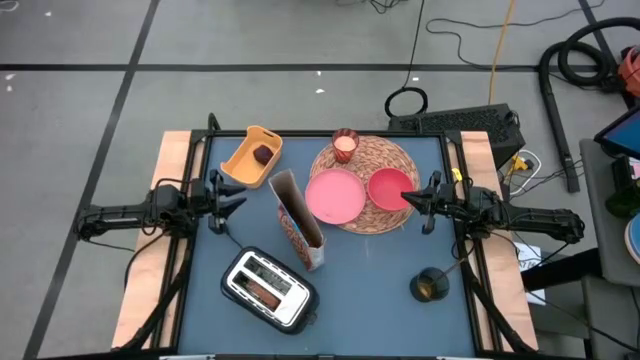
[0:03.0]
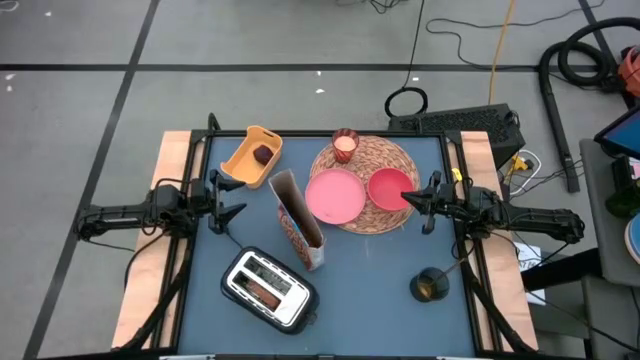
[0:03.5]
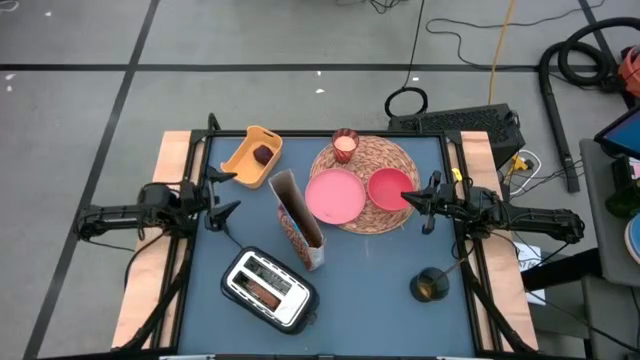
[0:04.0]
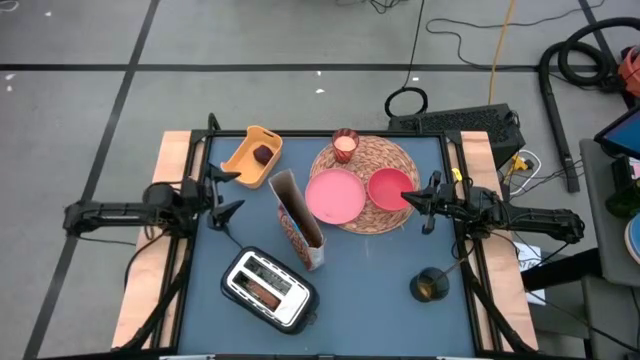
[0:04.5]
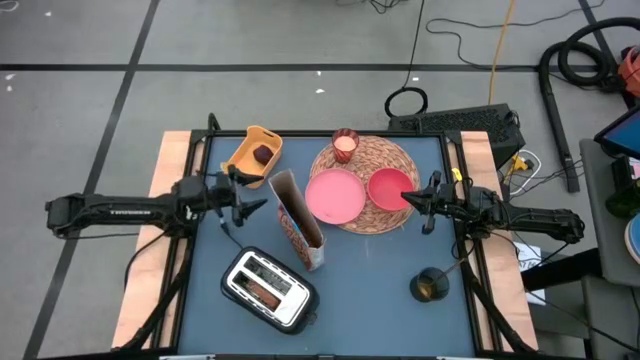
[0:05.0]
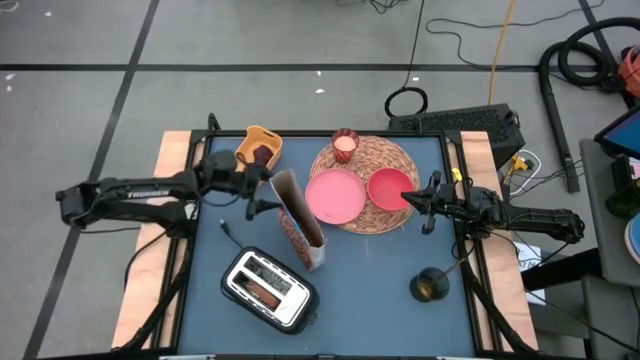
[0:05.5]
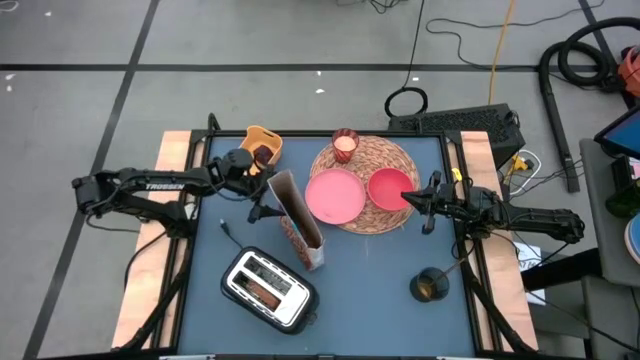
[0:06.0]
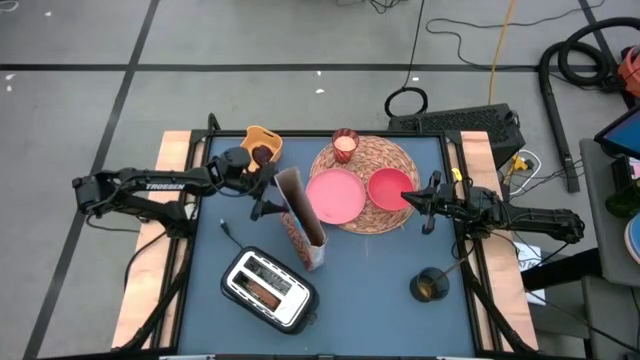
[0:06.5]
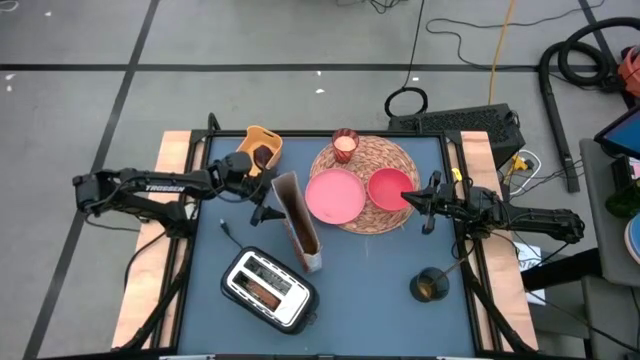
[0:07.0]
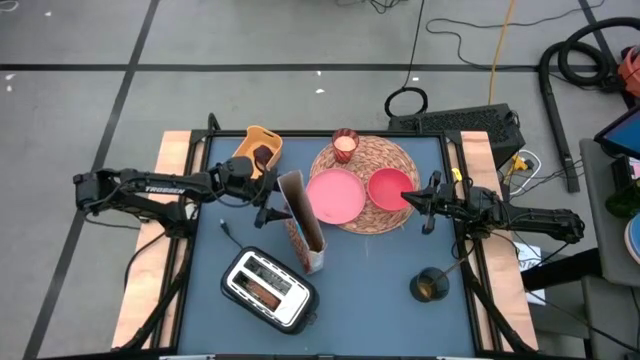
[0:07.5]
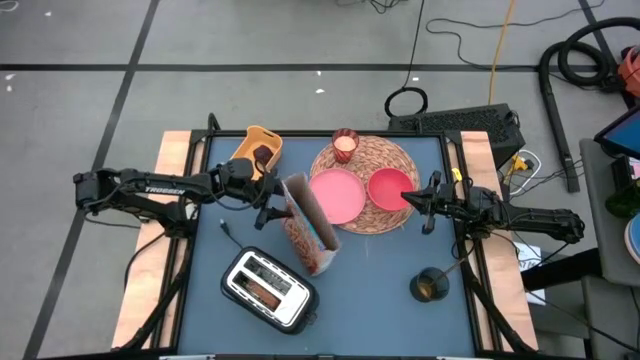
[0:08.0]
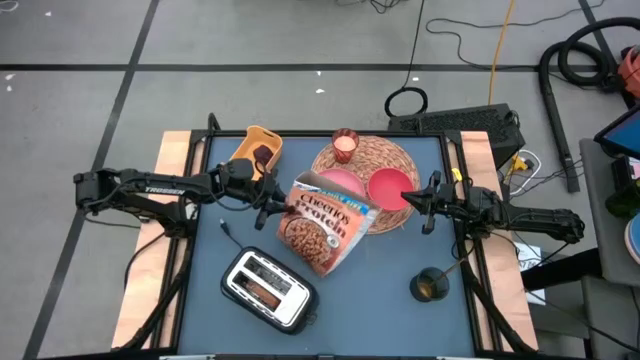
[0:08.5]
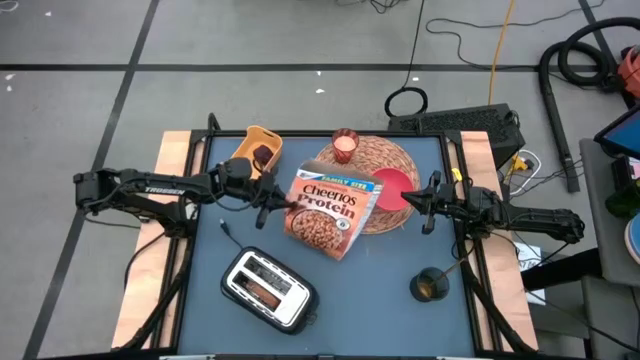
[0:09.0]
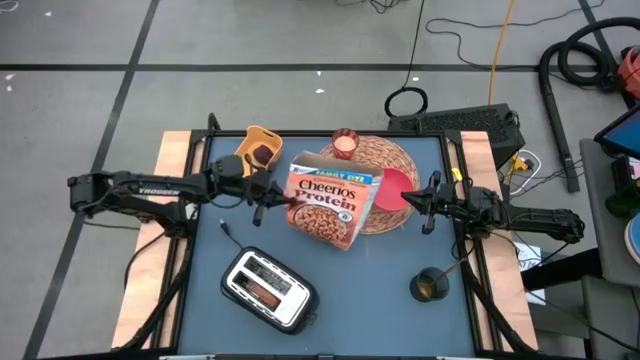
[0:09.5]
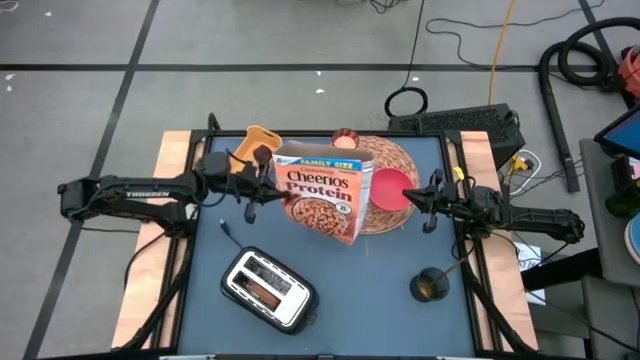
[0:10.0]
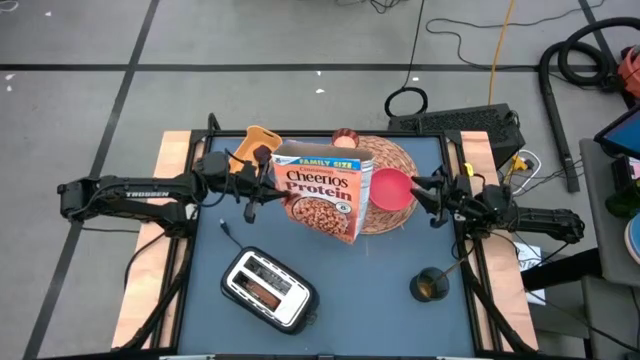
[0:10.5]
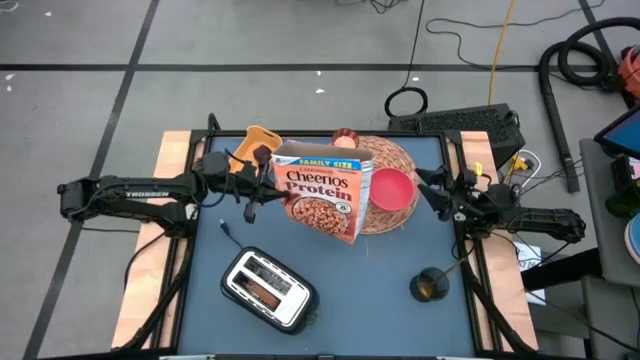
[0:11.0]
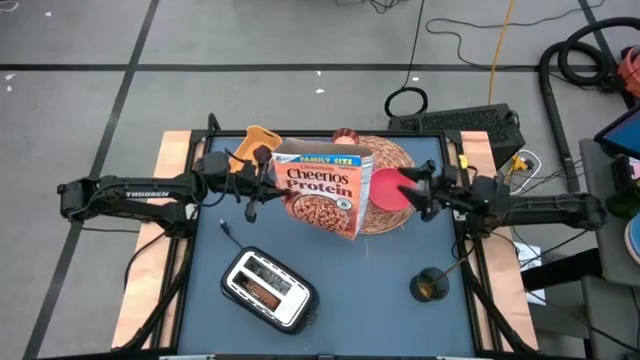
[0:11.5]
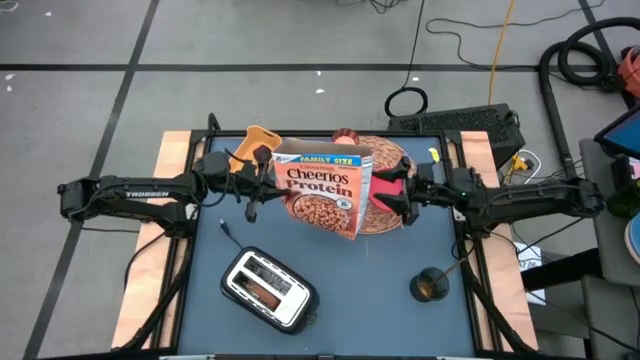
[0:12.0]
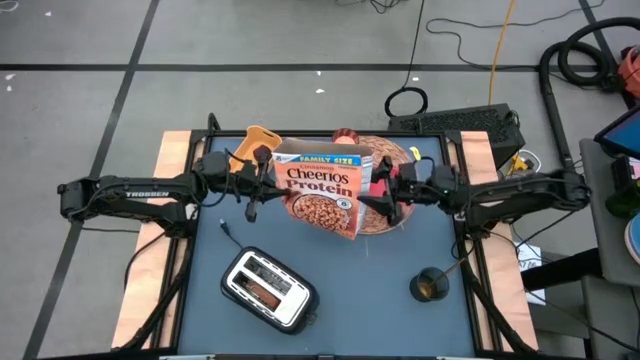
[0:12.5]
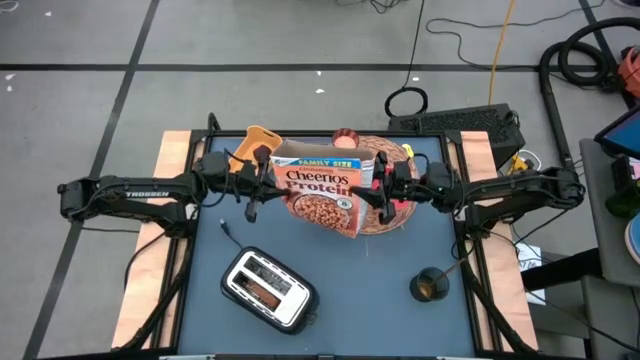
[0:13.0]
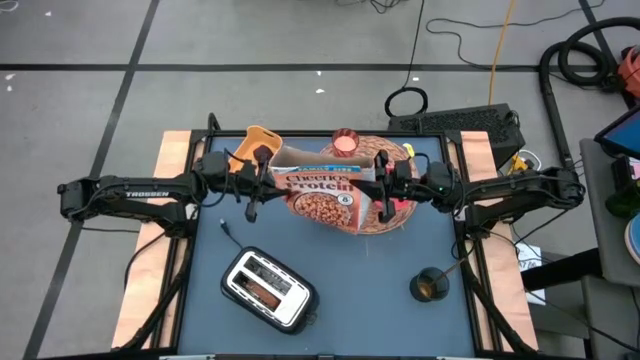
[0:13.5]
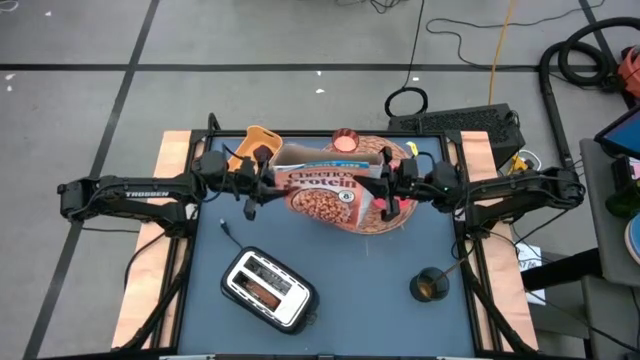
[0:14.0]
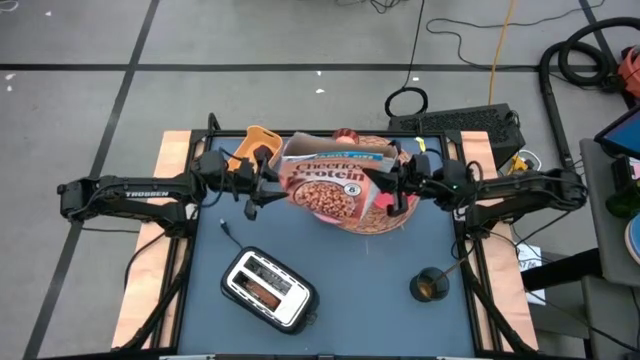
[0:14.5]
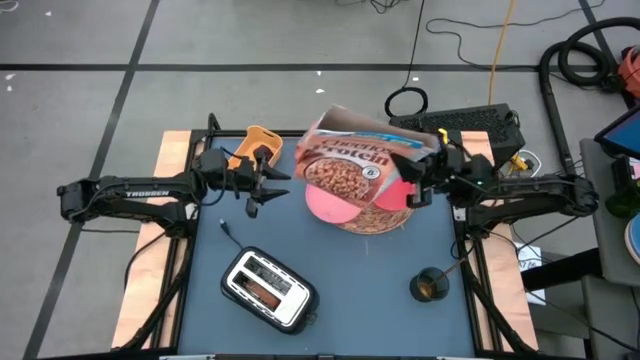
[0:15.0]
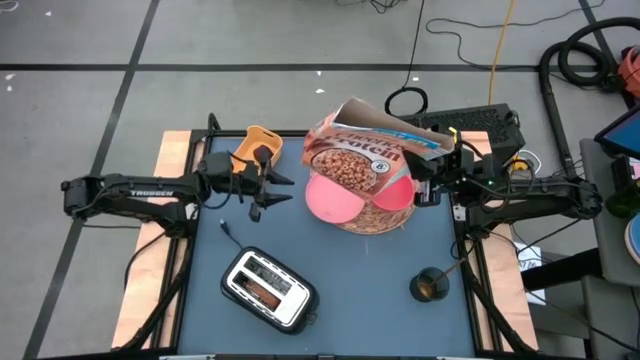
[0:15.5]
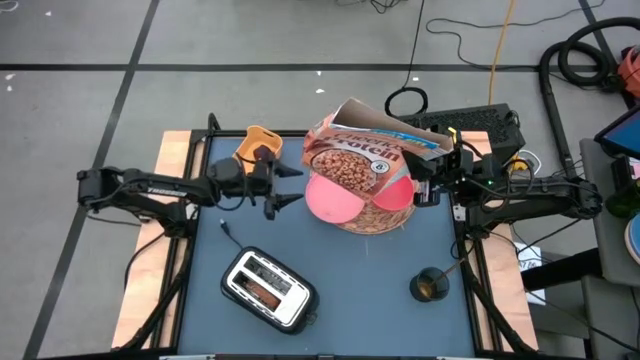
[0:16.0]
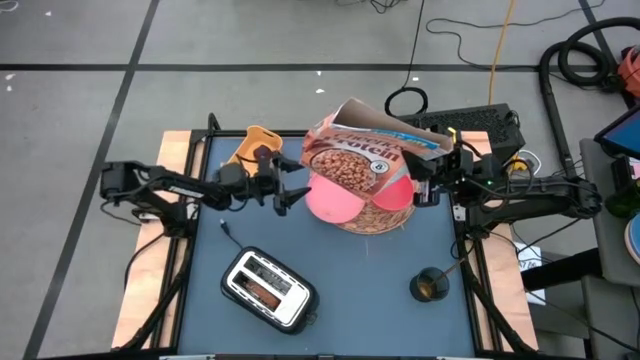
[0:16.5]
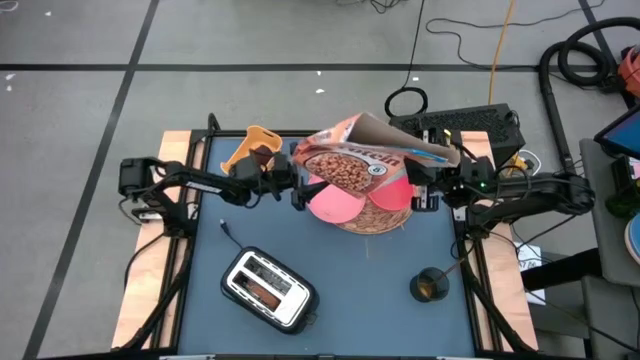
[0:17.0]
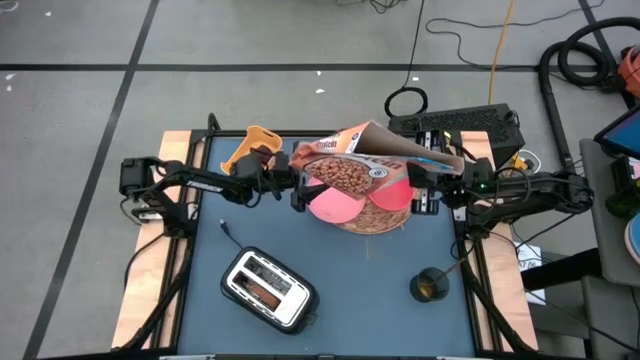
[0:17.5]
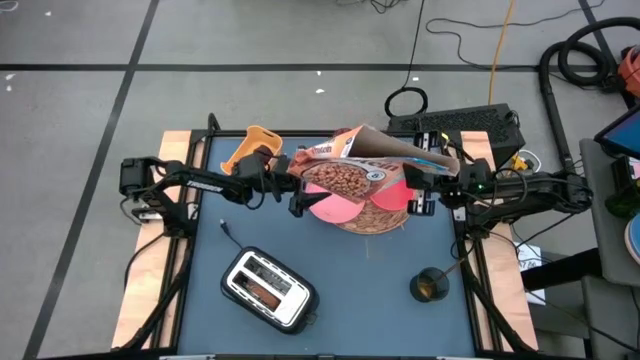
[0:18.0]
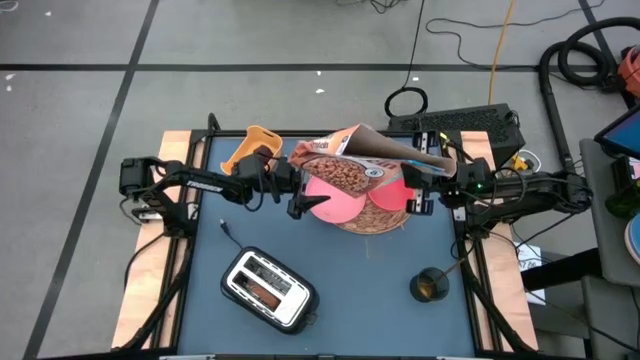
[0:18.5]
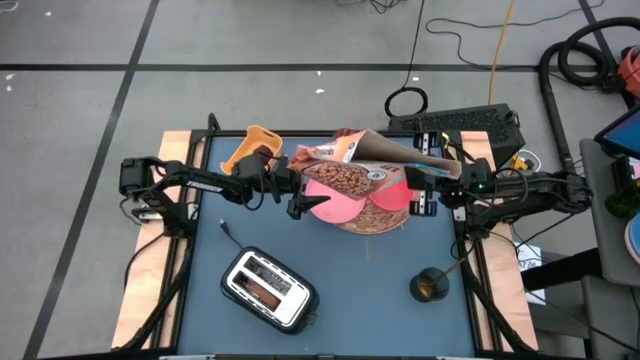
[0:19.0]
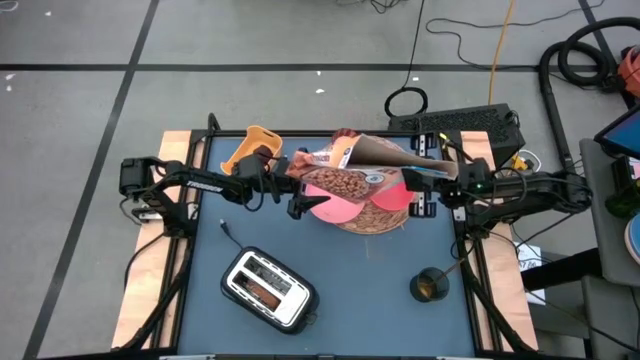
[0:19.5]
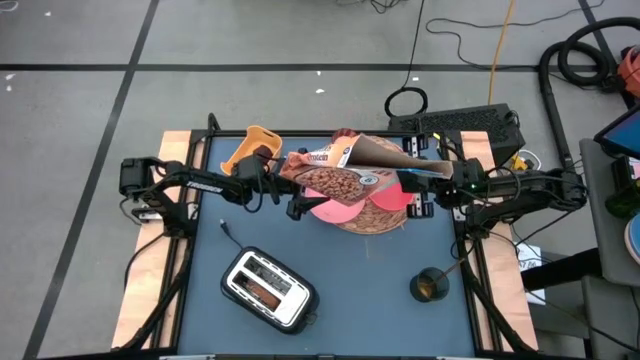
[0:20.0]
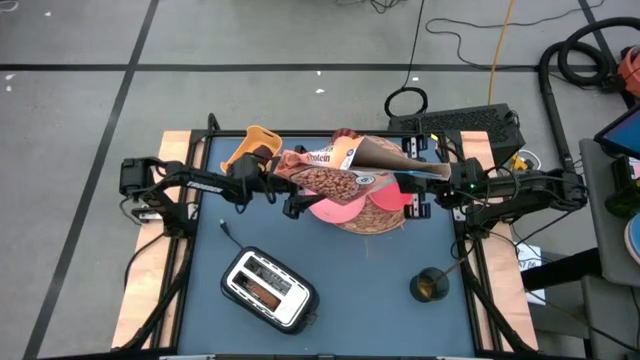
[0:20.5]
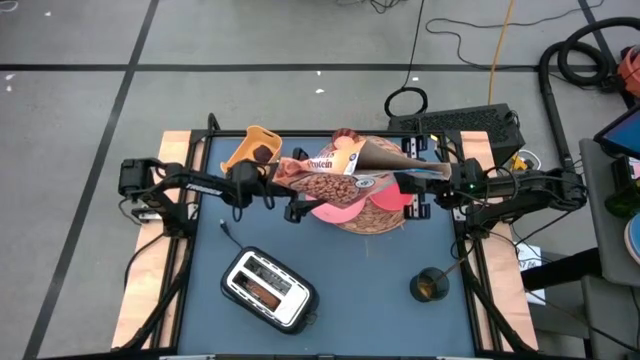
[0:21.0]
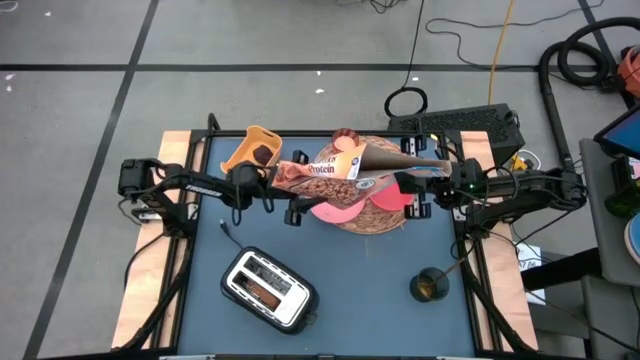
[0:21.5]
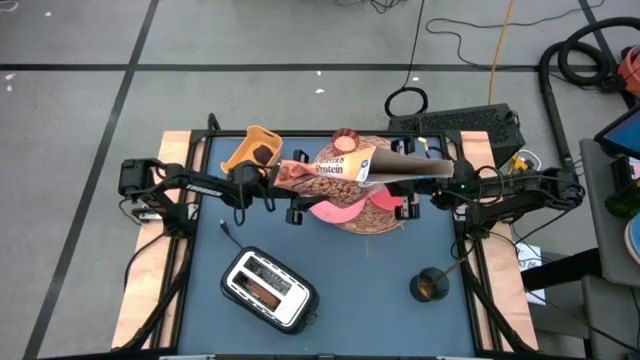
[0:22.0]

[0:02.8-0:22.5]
Task: Arrange a breakfast setting
Pour the cereal from the cereal box into the red bowl
